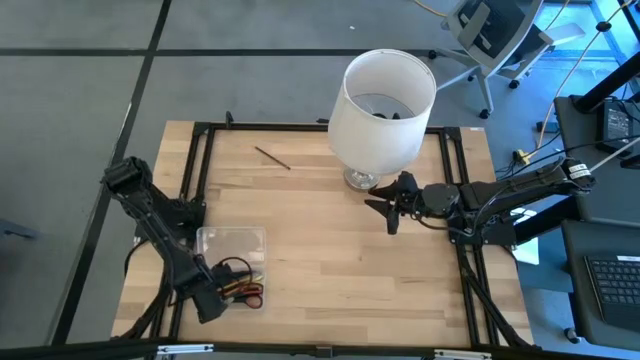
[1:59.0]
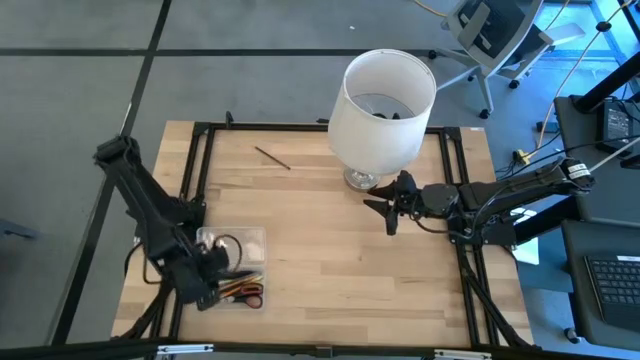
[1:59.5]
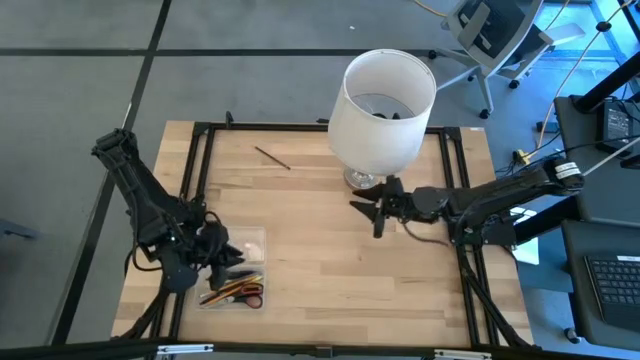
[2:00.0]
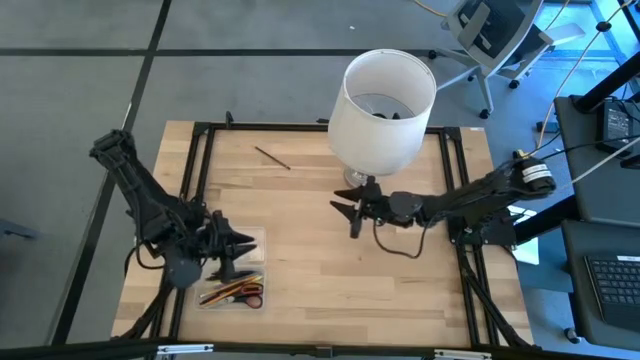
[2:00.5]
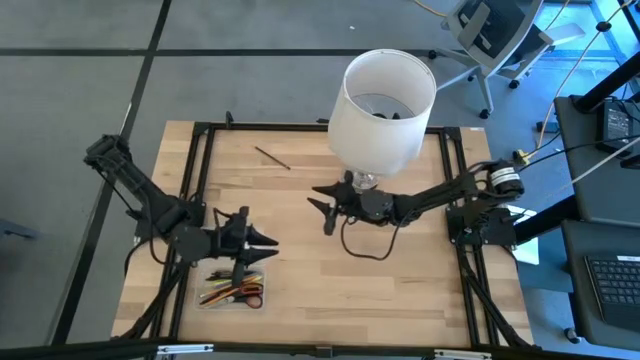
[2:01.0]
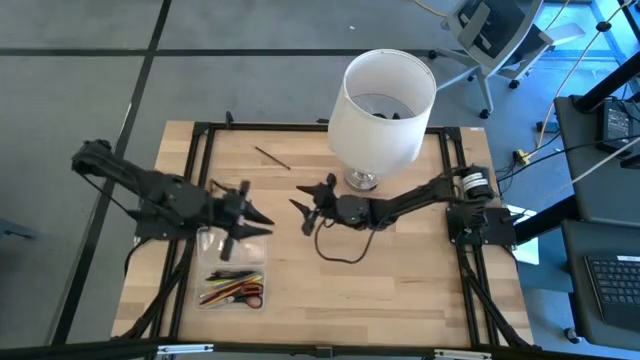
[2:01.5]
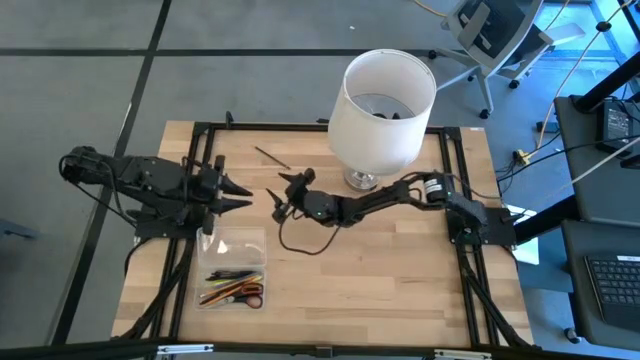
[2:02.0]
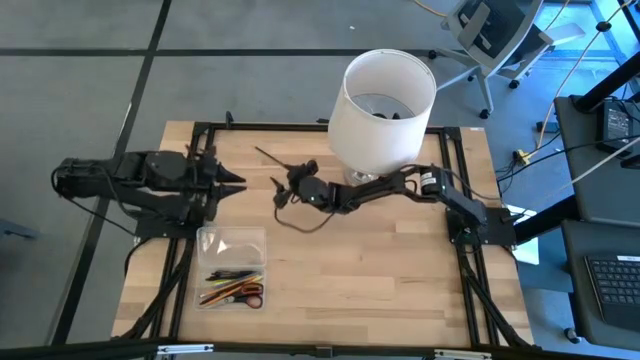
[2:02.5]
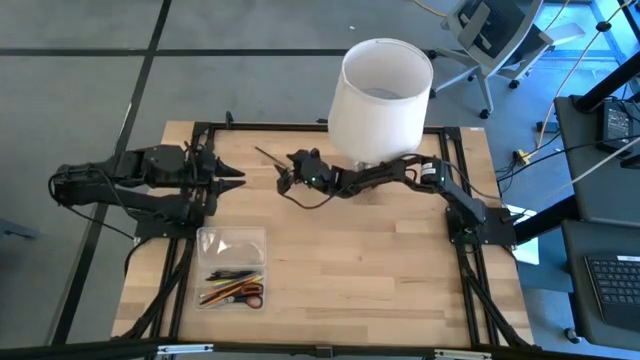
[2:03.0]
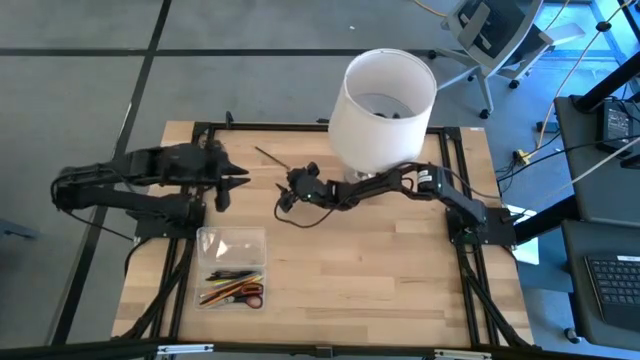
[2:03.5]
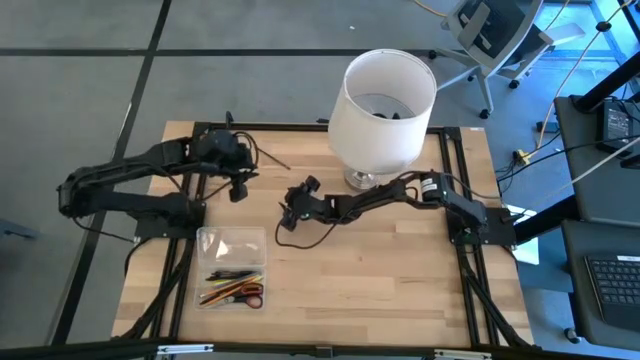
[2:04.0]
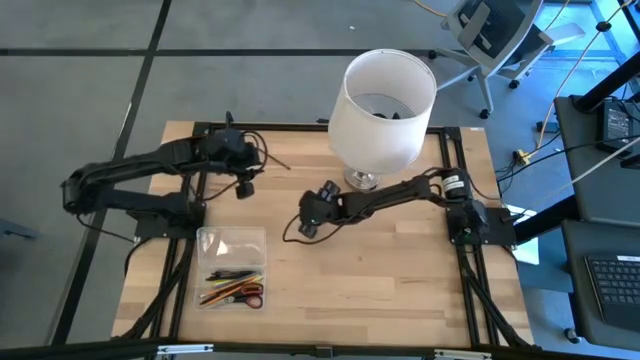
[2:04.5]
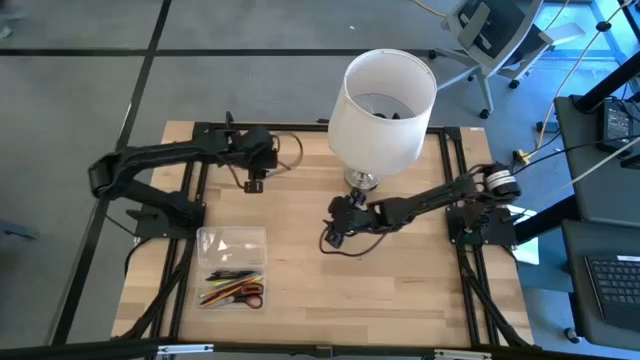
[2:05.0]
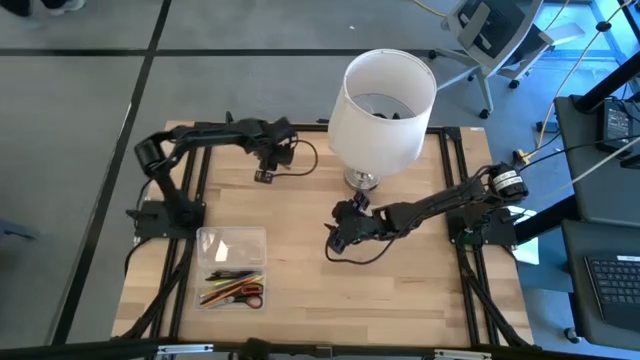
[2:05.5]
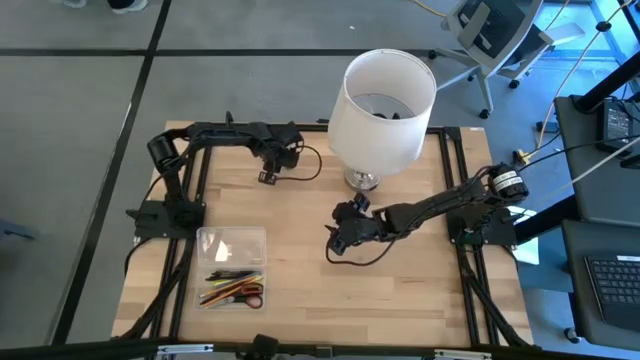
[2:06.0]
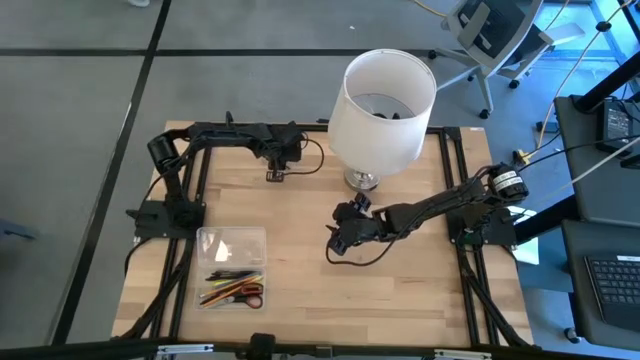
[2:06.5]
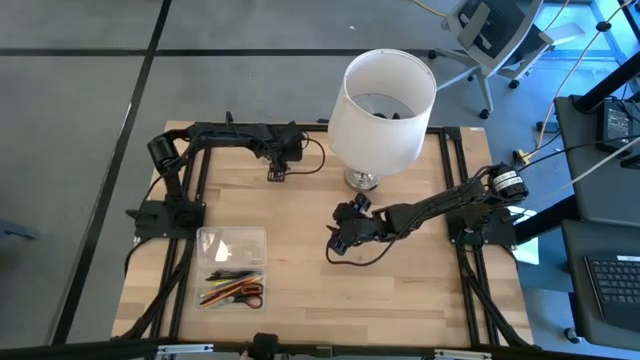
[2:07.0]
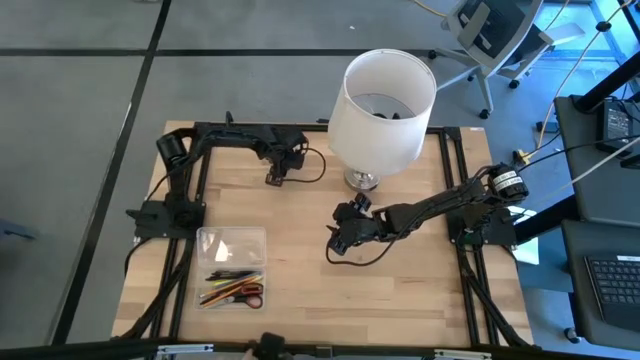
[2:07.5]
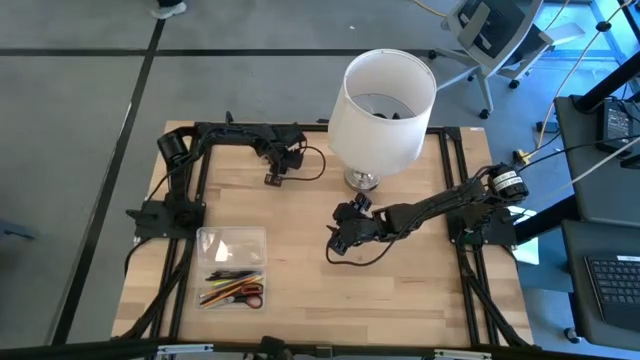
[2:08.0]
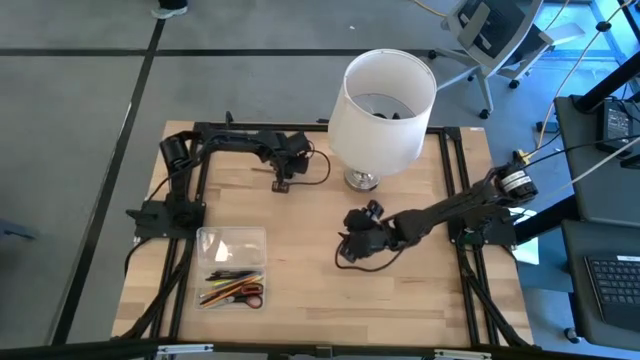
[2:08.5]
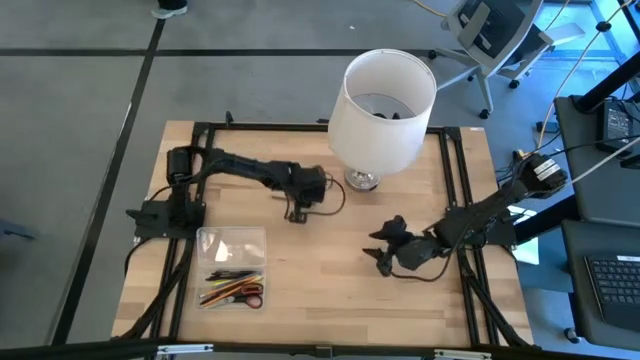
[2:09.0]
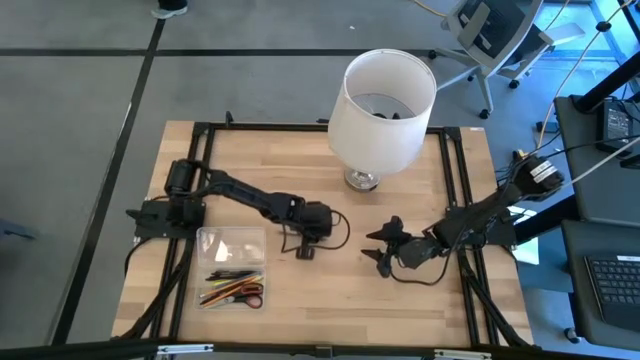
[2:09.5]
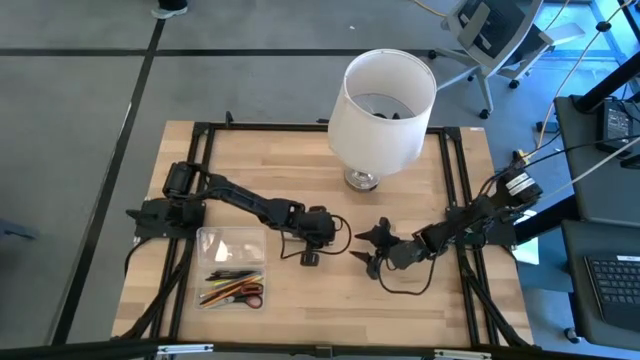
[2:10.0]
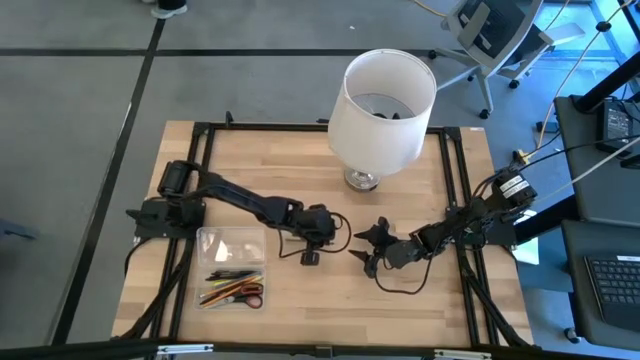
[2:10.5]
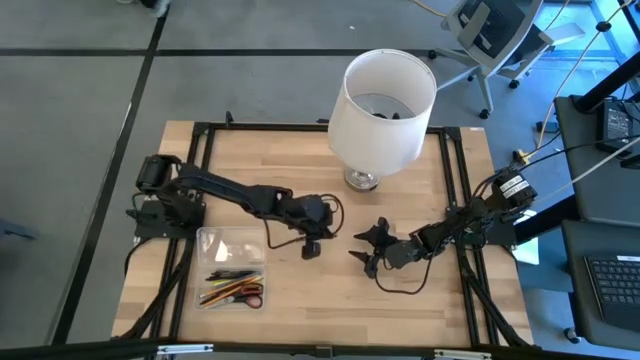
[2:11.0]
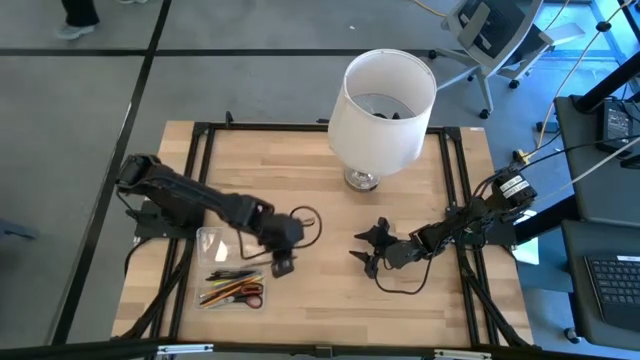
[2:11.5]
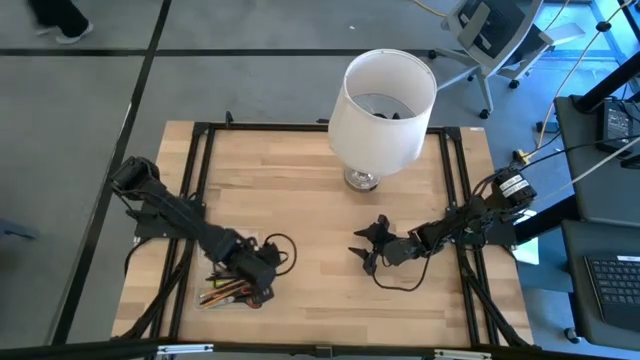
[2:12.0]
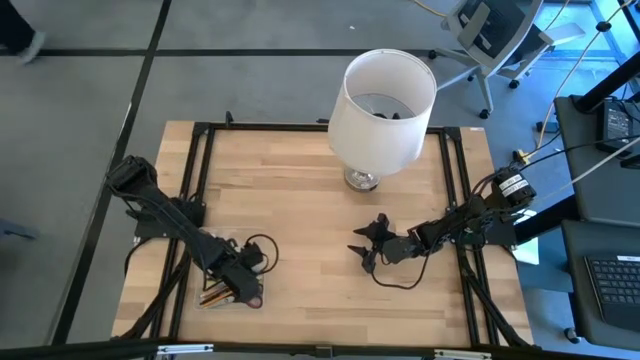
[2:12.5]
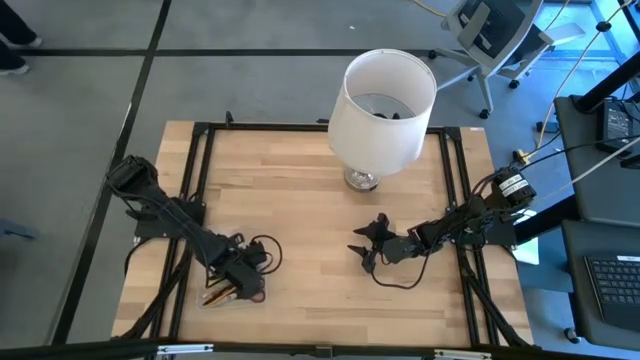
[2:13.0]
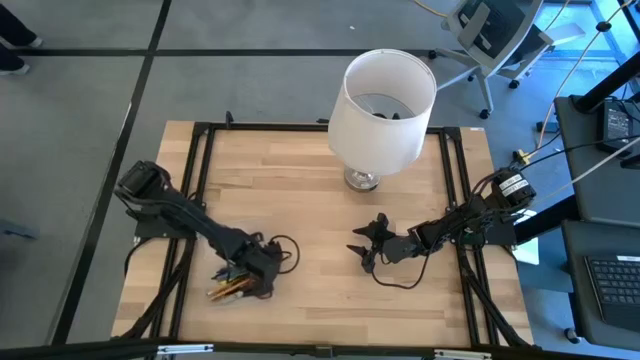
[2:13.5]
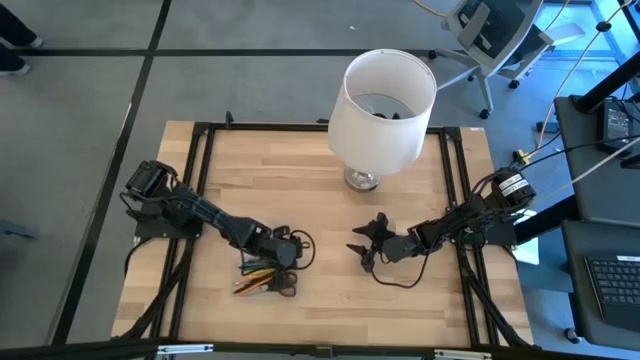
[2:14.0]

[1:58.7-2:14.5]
Task: Pick & place school supplies into a supply box
Put the black pencil into the transparent supply box
